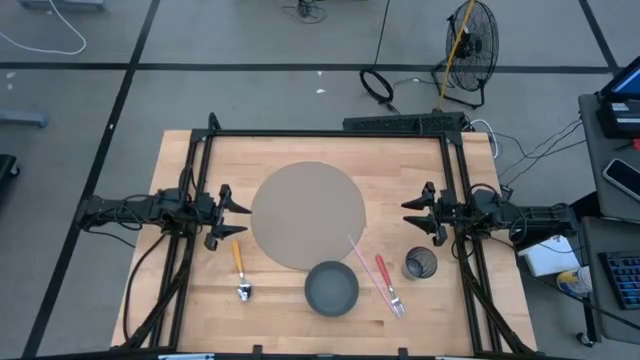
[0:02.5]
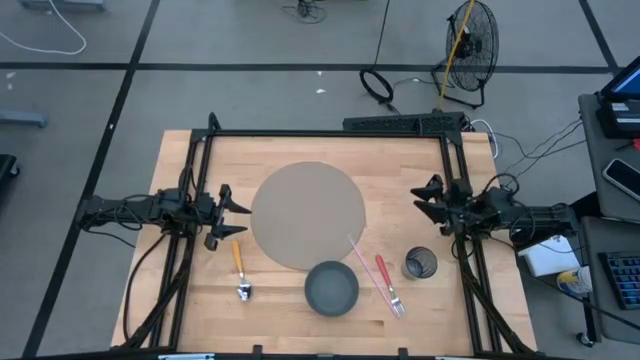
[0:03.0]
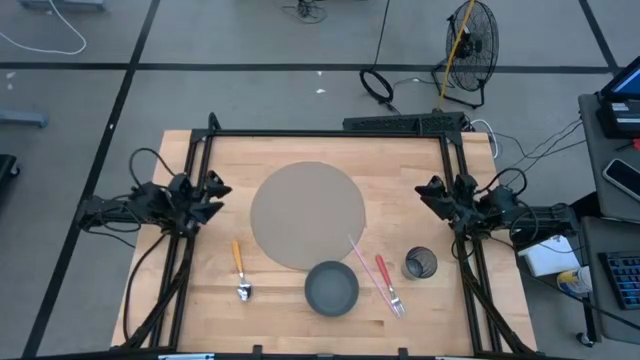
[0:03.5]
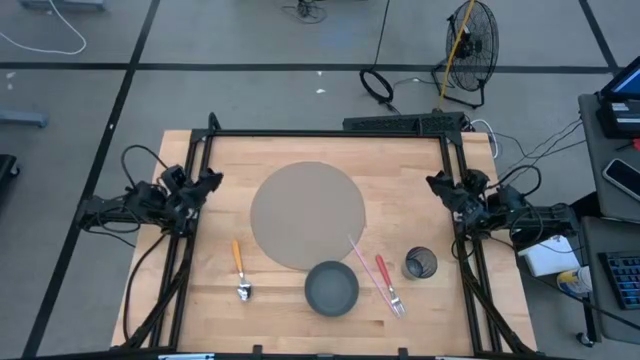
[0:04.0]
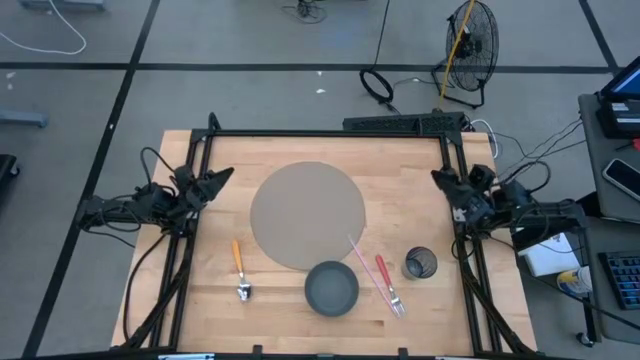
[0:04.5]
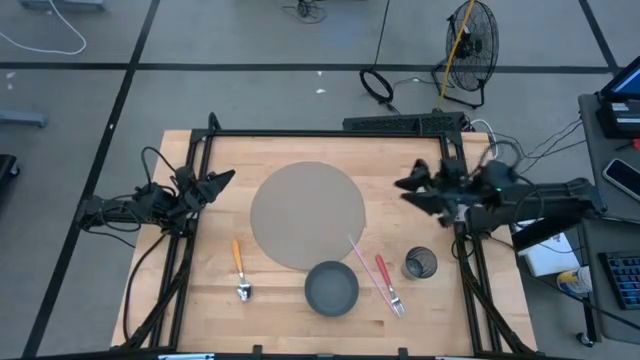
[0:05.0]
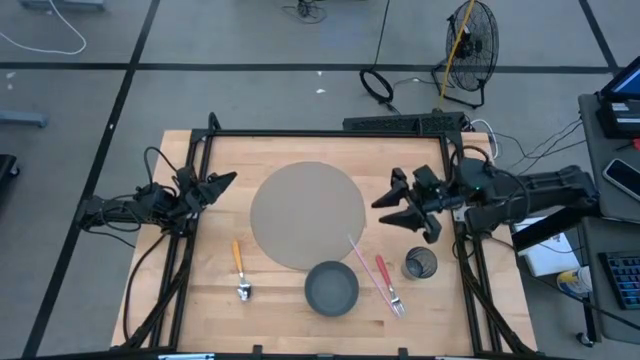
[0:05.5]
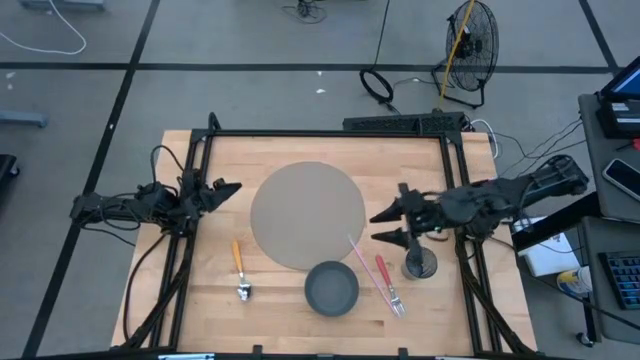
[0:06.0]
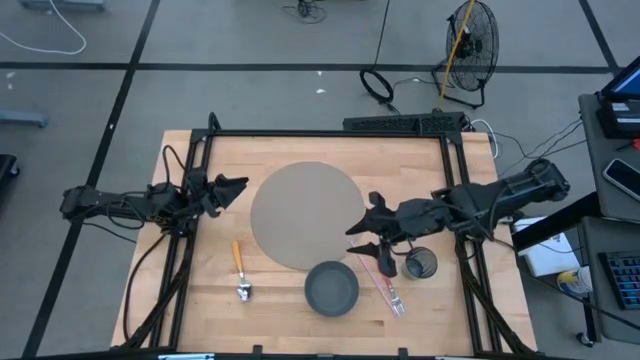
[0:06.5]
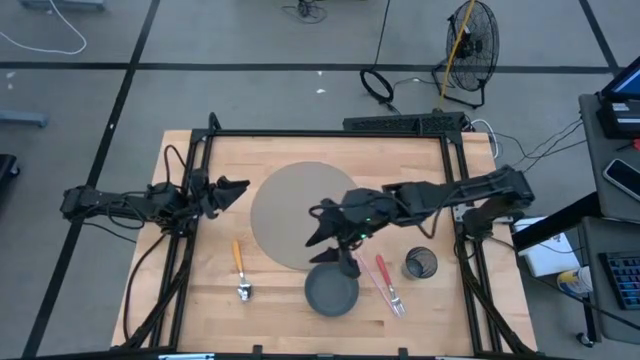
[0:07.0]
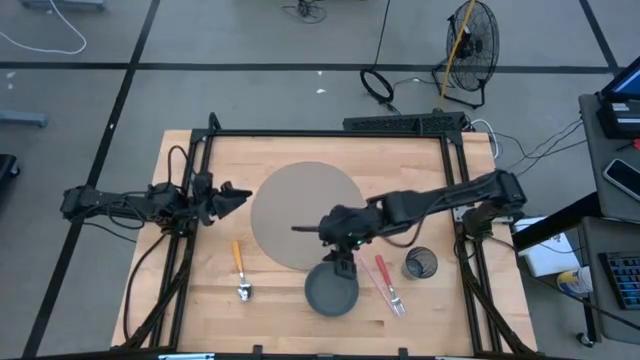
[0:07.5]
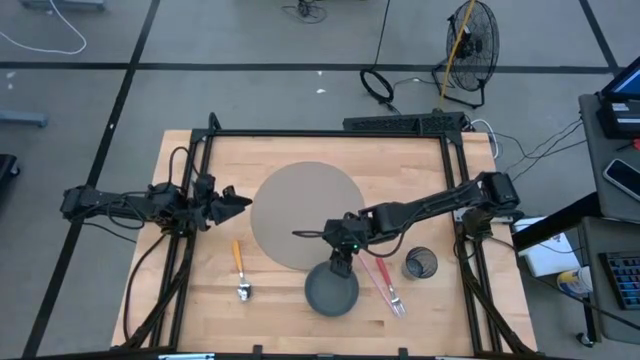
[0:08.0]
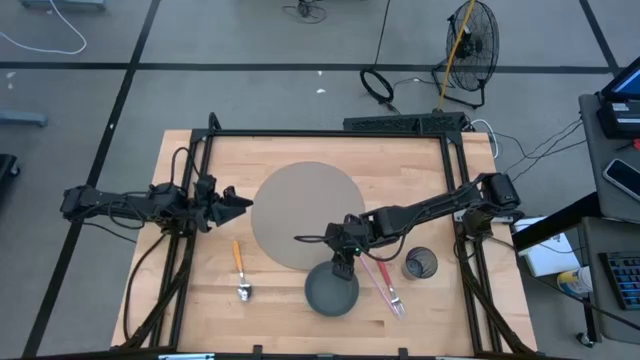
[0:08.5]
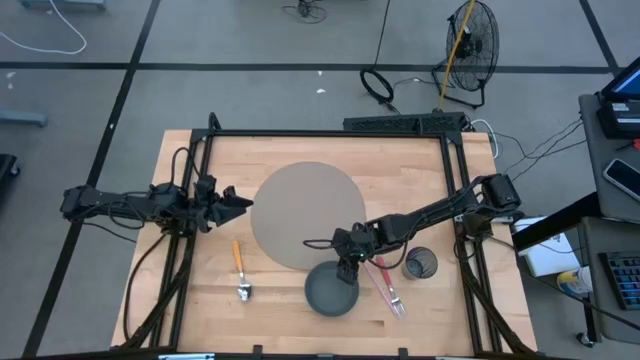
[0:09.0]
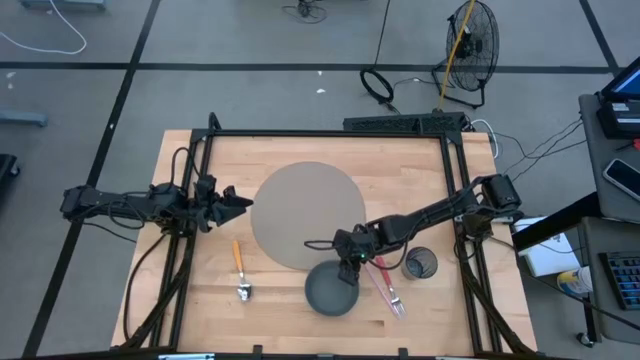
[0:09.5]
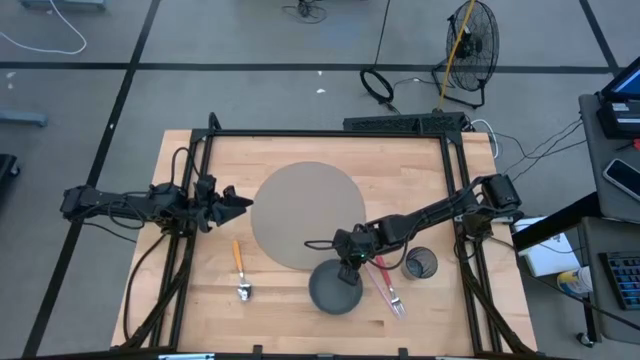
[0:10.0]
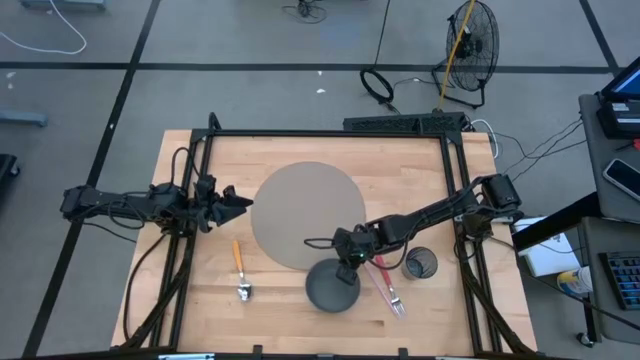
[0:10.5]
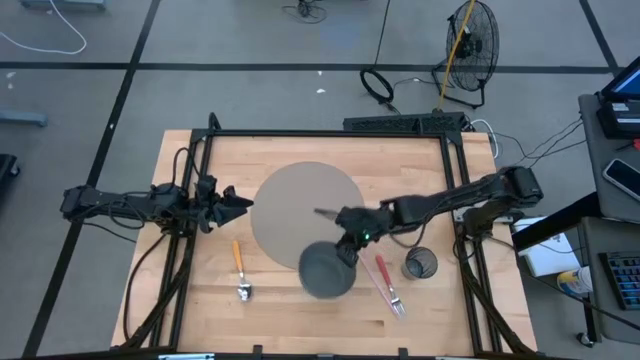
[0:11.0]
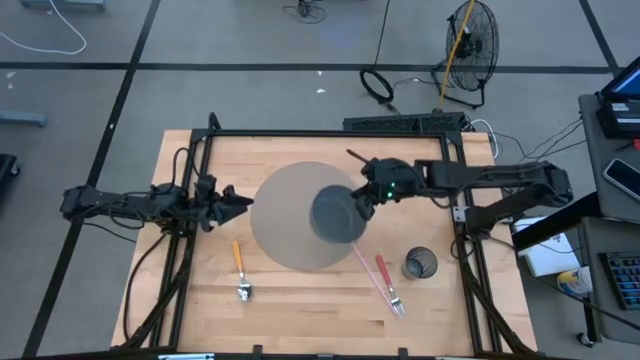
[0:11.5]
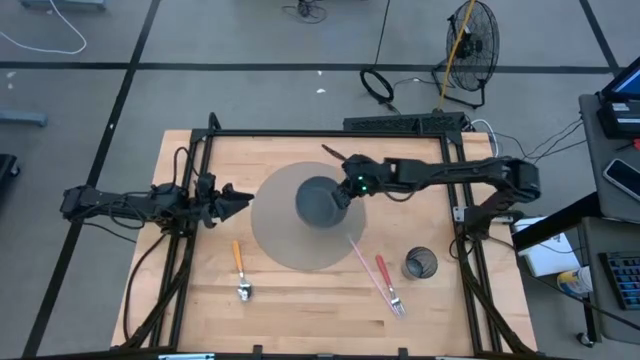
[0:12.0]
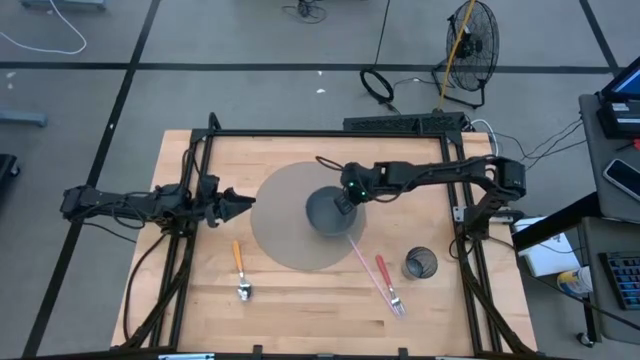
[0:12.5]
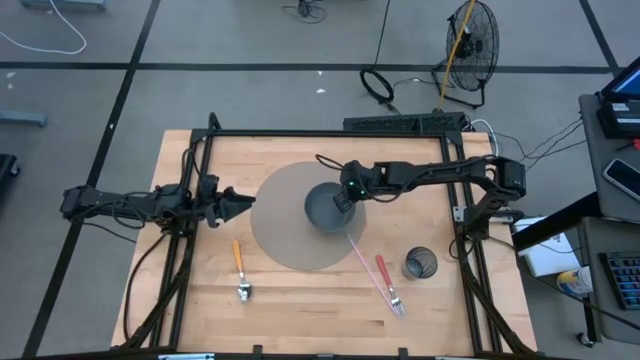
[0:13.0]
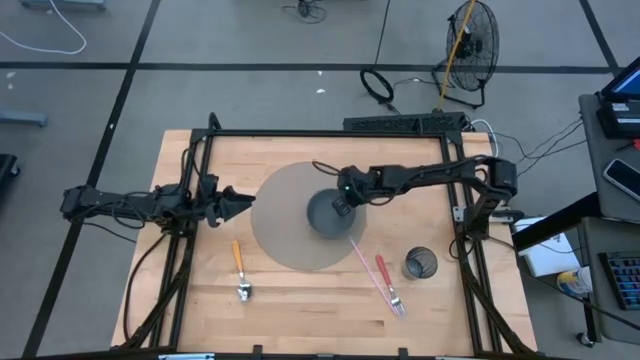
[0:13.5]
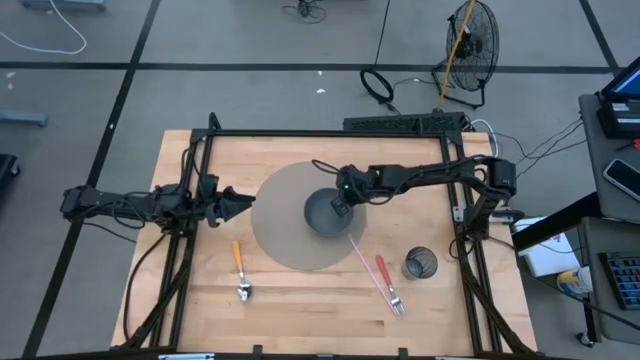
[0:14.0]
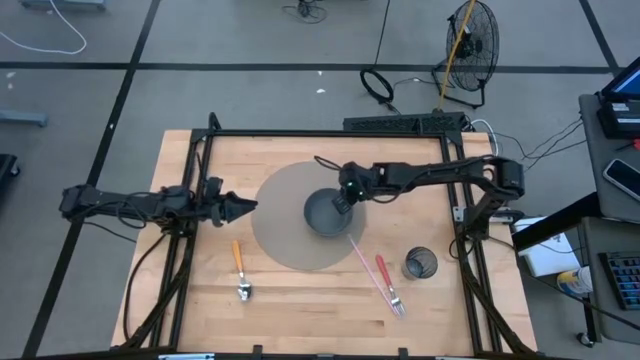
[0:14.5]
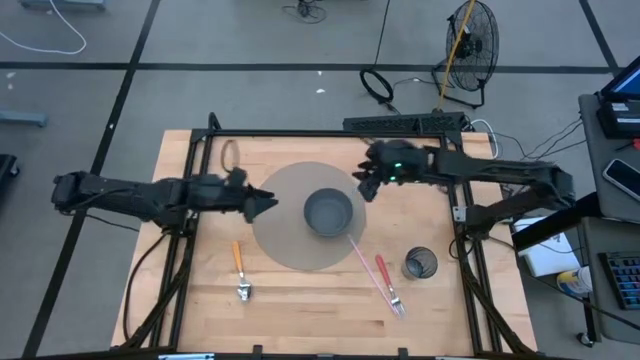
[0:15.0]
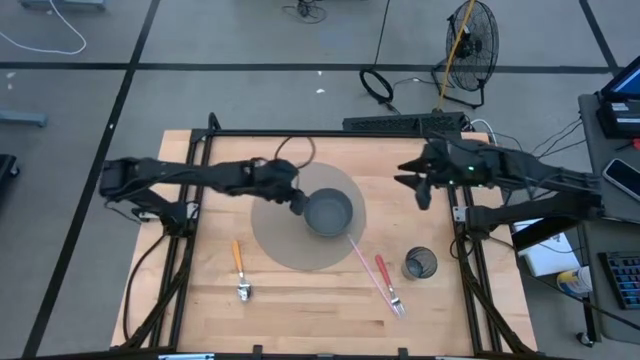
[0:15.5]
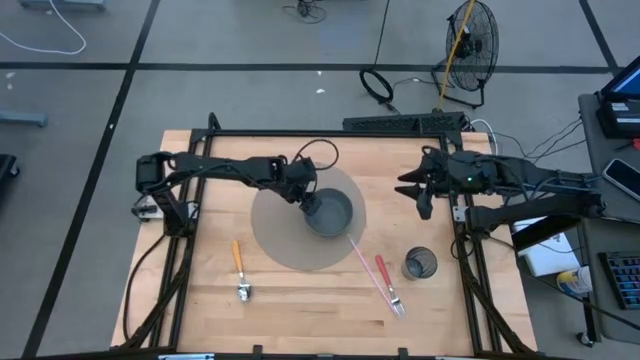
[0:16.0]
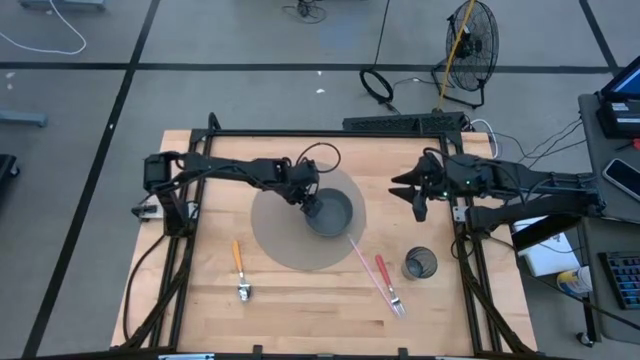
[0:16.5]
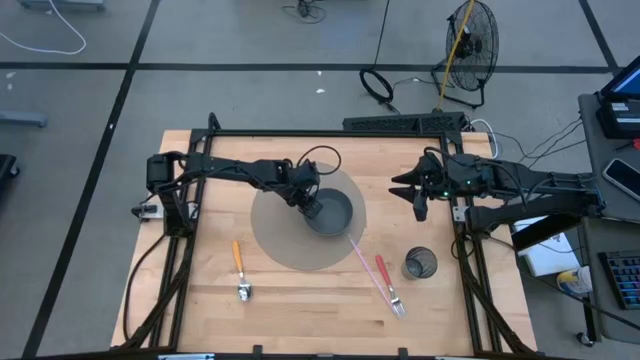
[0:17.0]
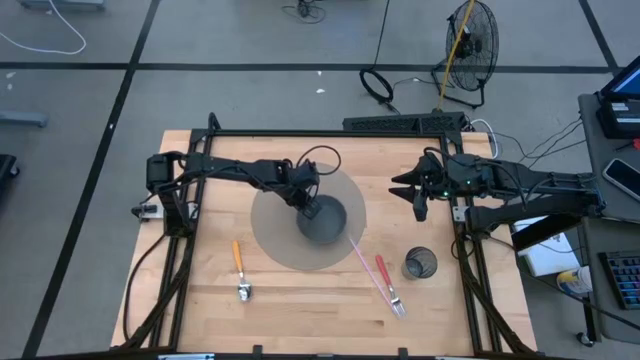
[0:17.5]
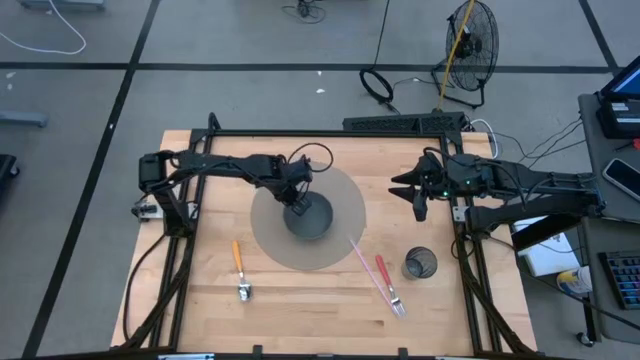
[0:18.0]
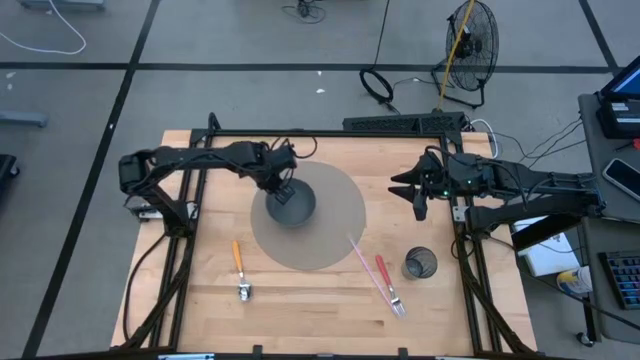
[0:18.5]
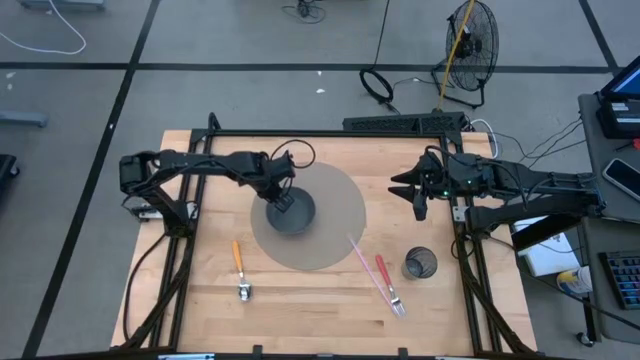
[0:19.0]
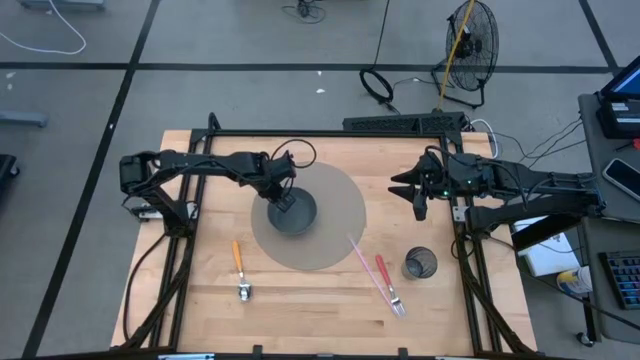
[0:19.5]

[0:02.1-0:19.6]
Task: Pick & Place Utensil
Put the gray bowl on the brown mat

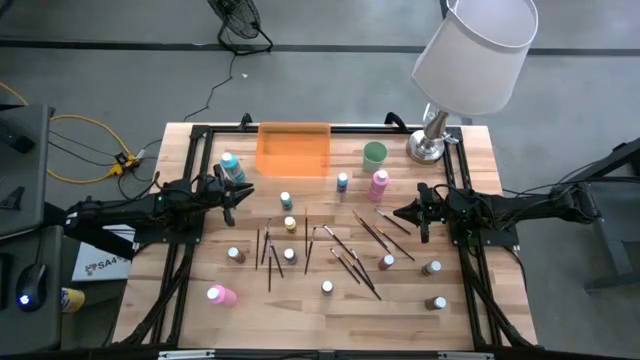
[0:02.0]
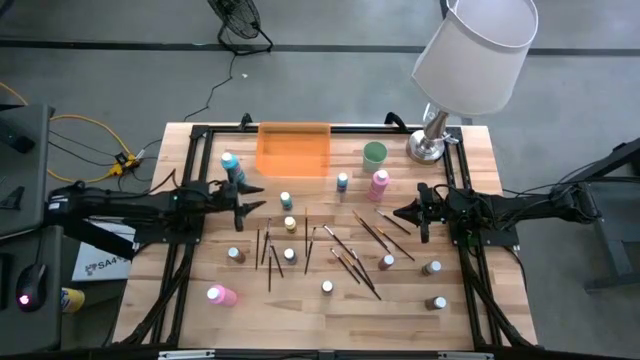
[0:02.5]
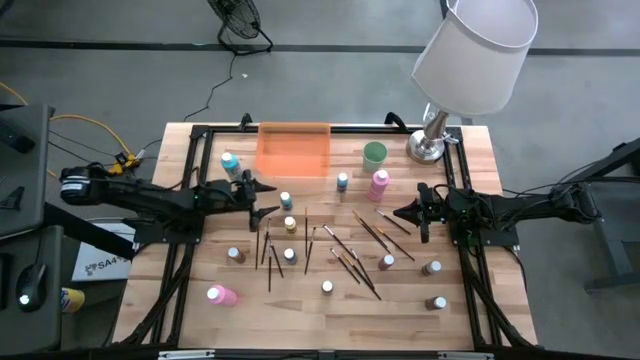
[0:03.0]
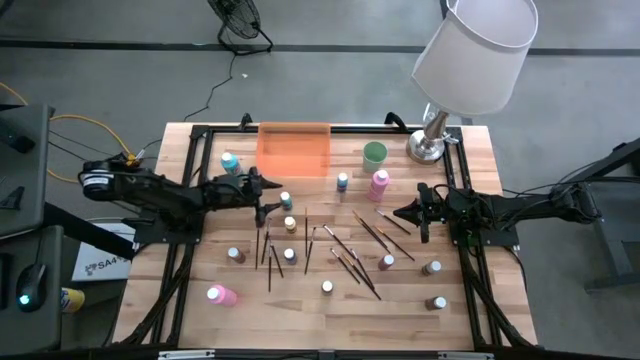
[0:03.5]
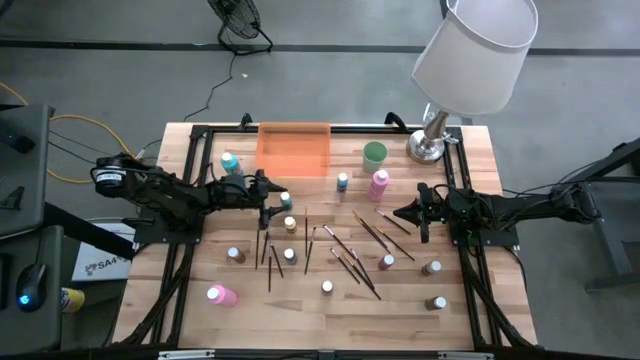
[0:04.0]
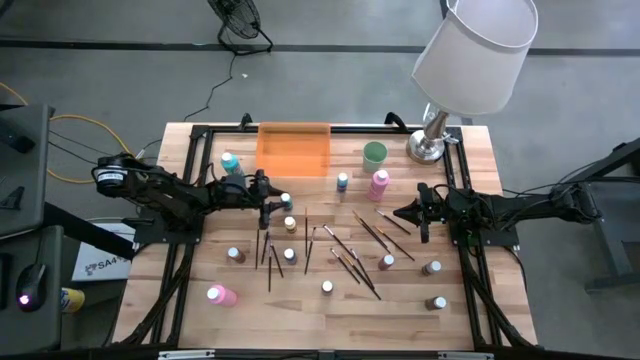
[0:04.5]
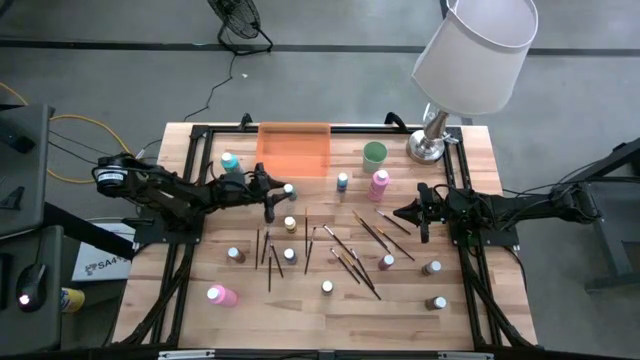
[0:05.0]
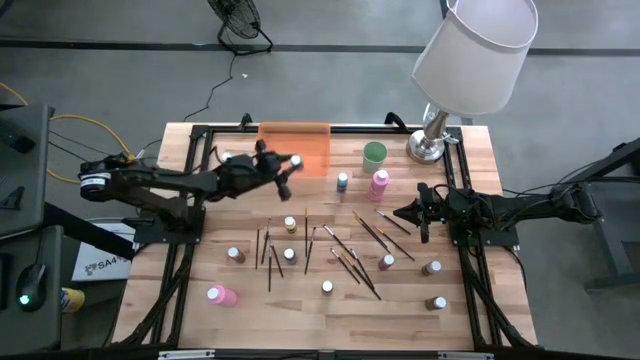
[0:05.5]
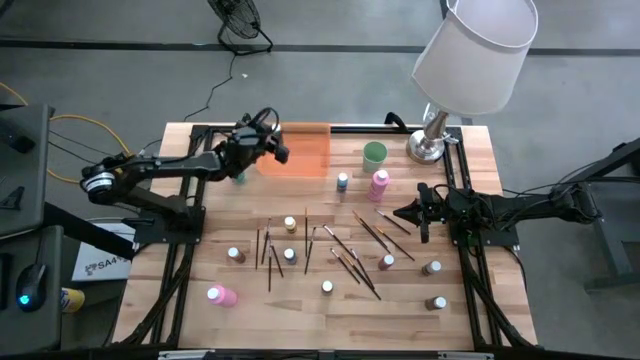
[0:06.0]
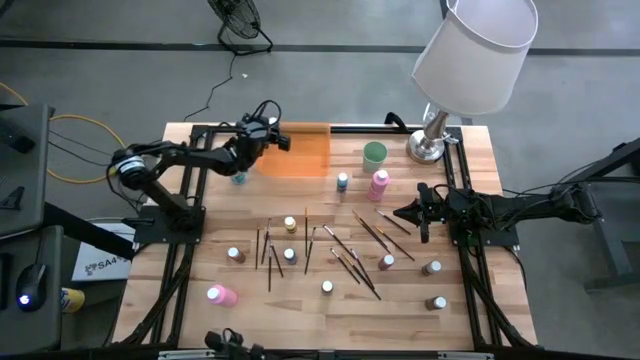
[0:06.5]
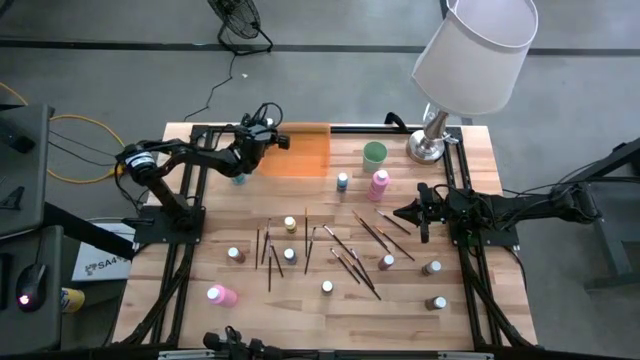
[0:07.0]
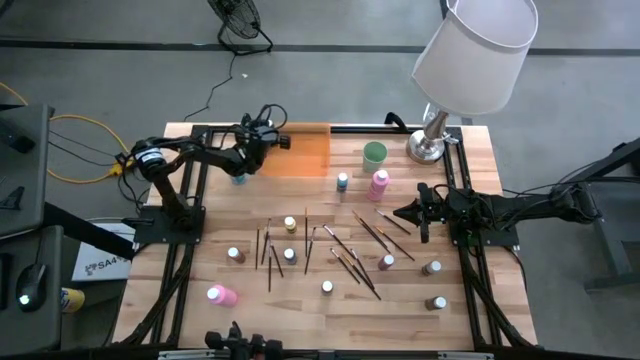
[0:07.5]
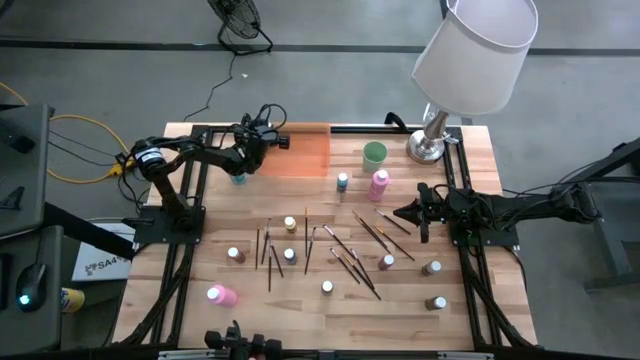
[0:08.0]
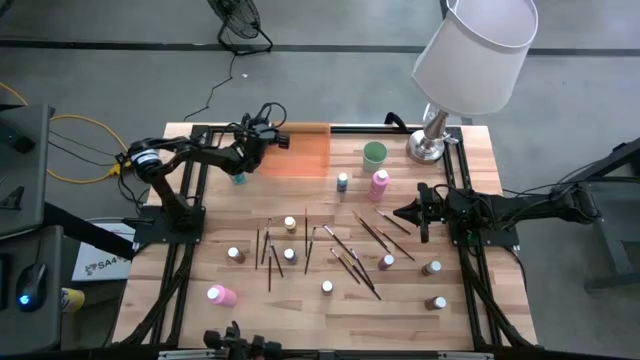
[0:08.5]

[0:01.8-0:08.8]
Task: Pick & Place Paint Supplies
Put the small light blue paint bottle into the orange bin
